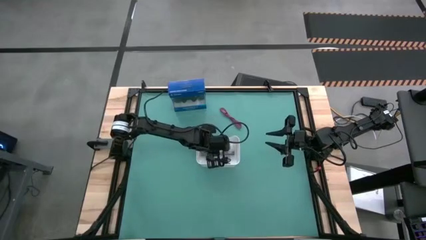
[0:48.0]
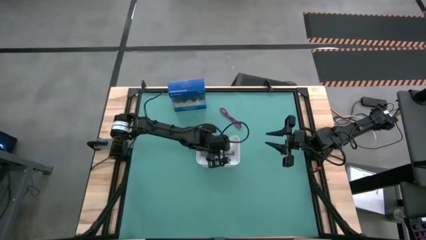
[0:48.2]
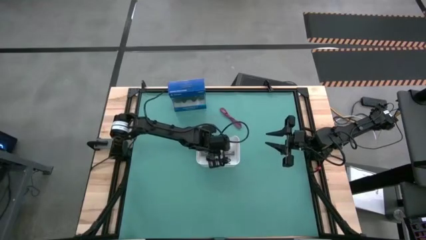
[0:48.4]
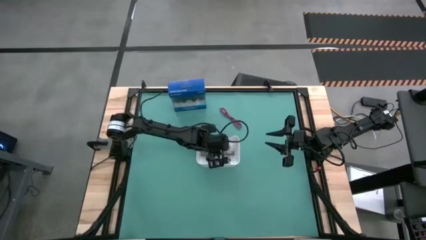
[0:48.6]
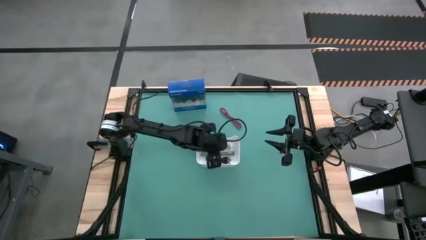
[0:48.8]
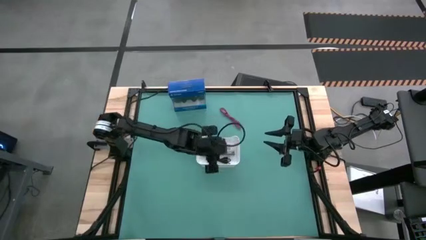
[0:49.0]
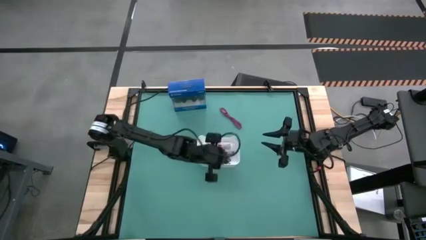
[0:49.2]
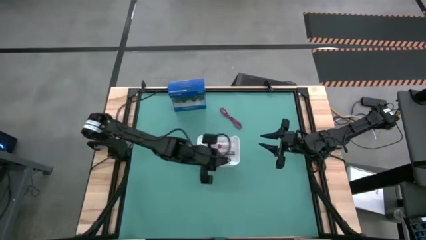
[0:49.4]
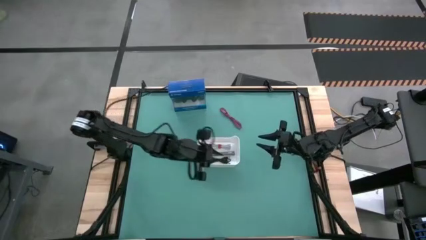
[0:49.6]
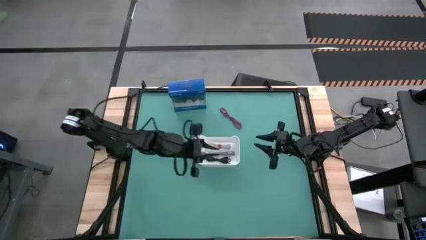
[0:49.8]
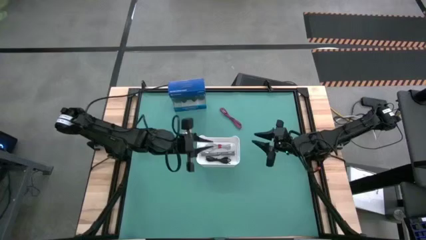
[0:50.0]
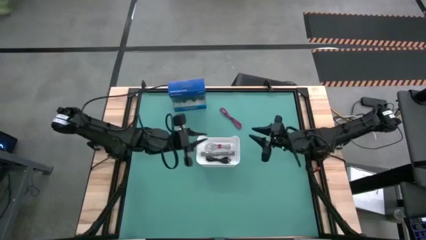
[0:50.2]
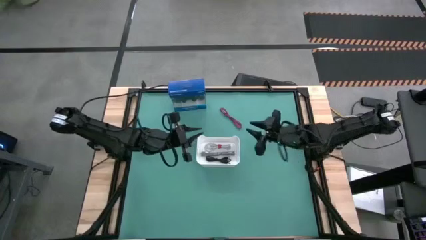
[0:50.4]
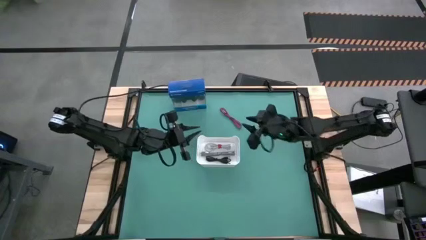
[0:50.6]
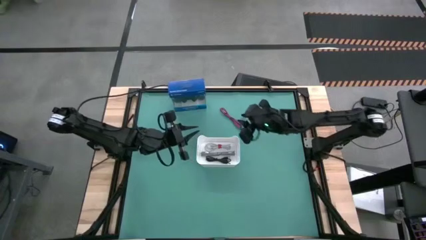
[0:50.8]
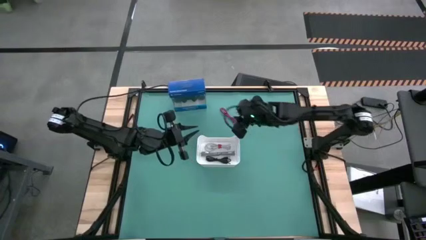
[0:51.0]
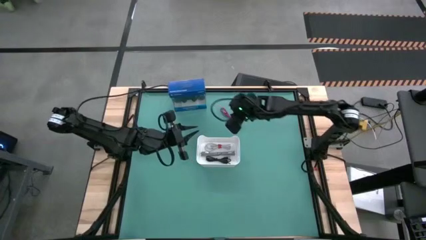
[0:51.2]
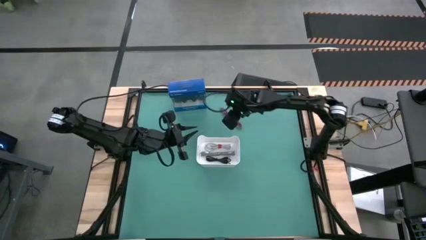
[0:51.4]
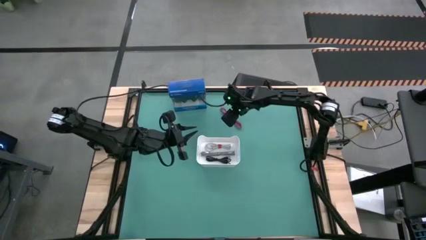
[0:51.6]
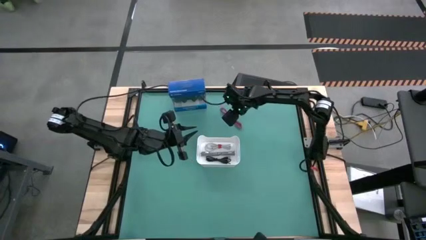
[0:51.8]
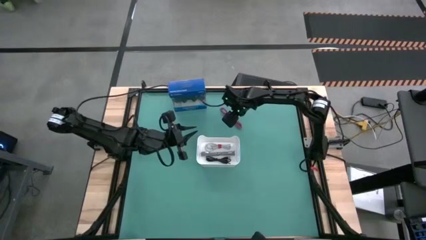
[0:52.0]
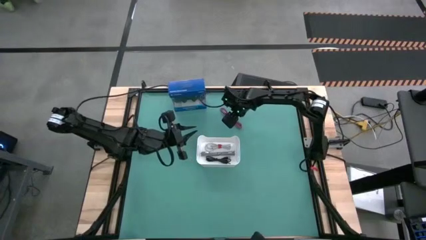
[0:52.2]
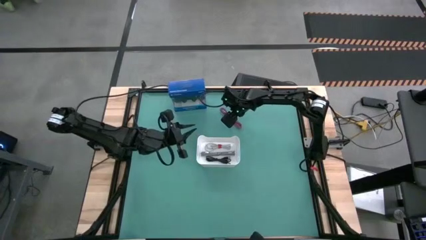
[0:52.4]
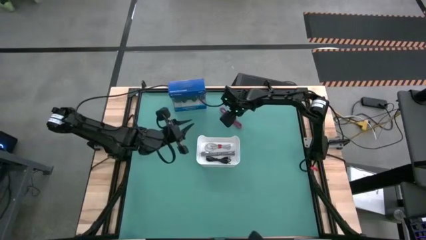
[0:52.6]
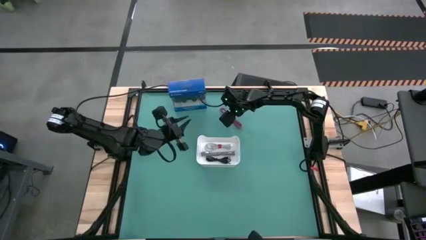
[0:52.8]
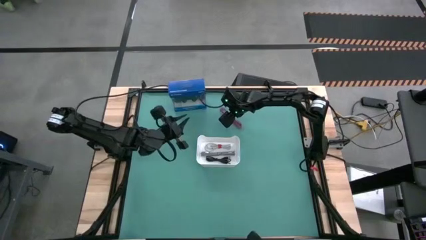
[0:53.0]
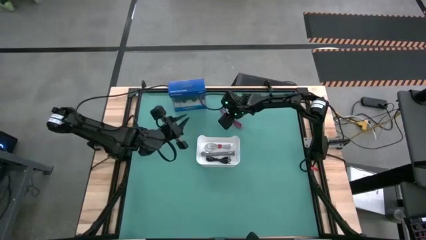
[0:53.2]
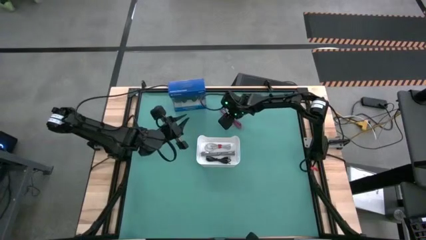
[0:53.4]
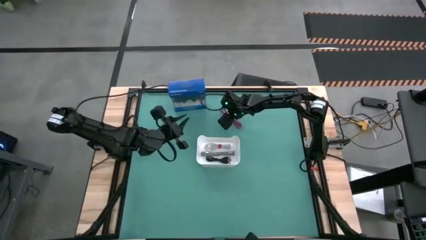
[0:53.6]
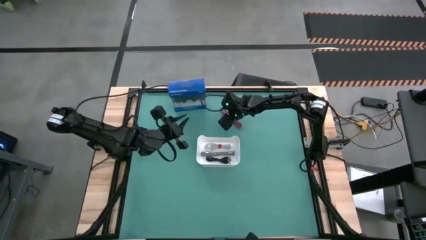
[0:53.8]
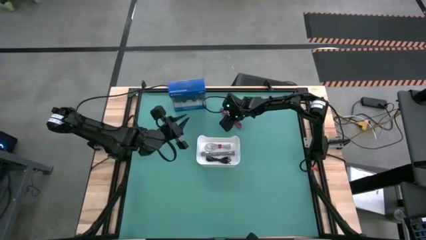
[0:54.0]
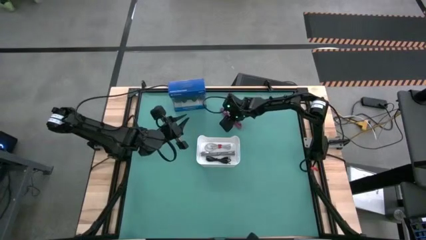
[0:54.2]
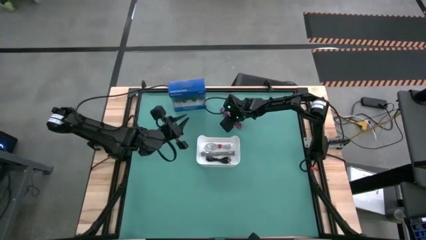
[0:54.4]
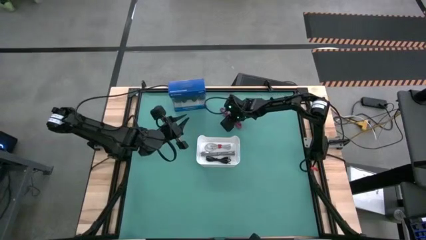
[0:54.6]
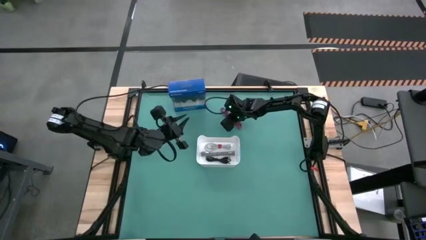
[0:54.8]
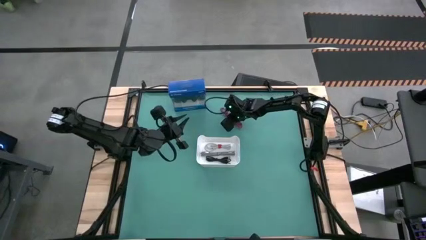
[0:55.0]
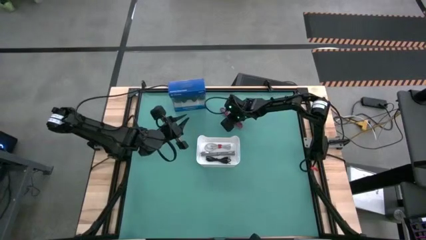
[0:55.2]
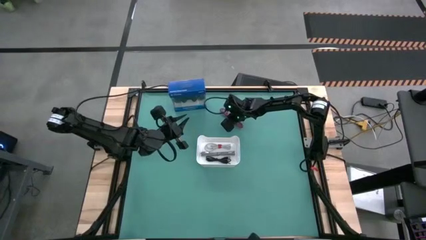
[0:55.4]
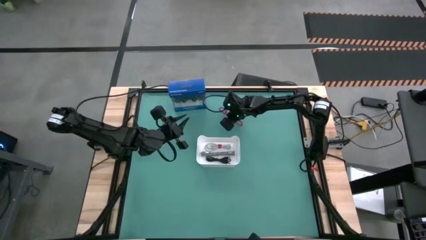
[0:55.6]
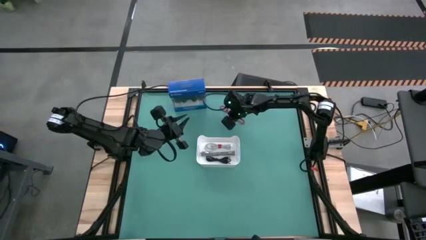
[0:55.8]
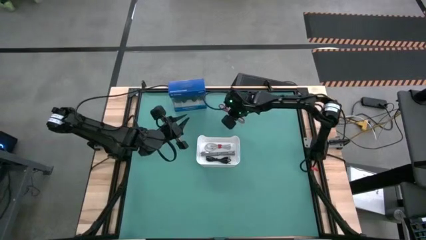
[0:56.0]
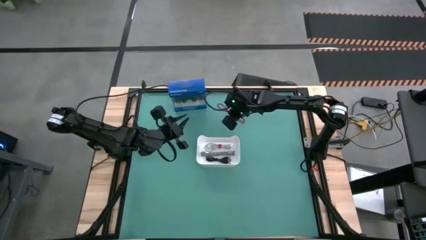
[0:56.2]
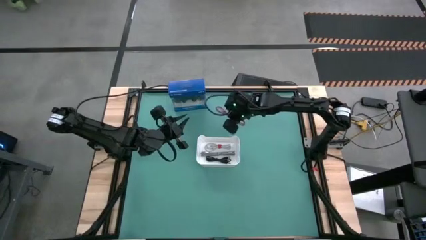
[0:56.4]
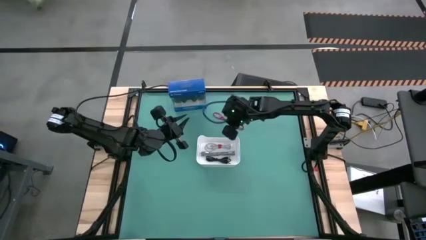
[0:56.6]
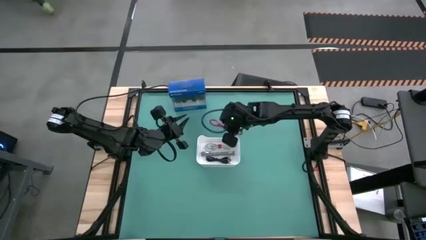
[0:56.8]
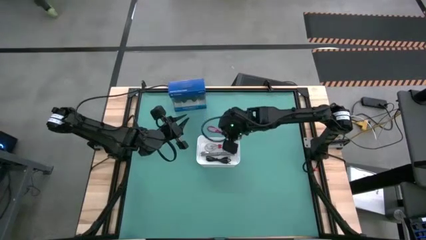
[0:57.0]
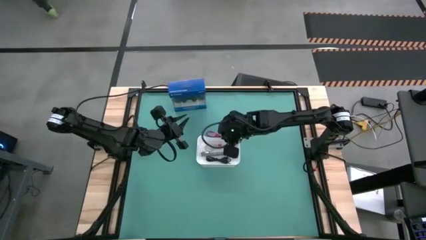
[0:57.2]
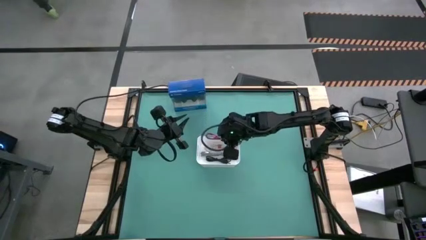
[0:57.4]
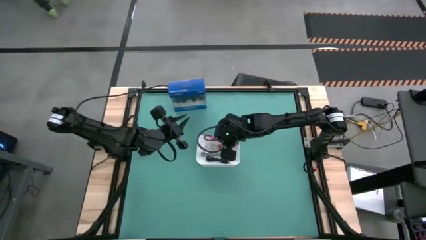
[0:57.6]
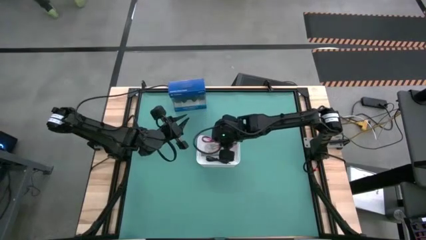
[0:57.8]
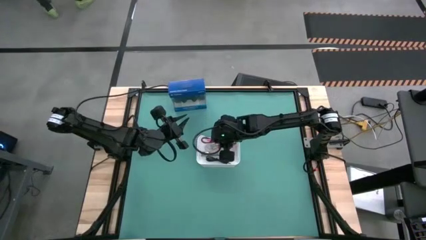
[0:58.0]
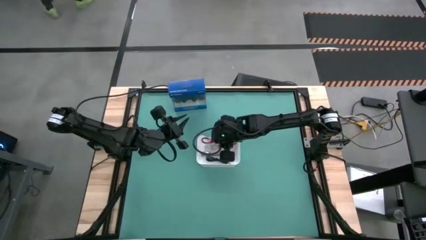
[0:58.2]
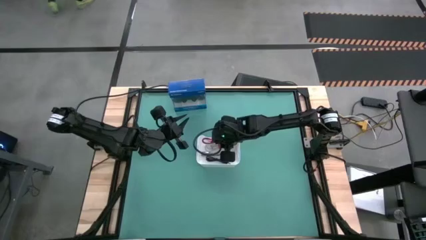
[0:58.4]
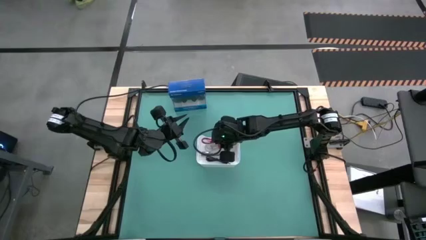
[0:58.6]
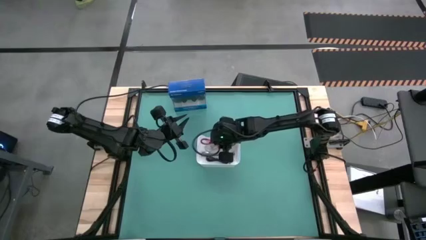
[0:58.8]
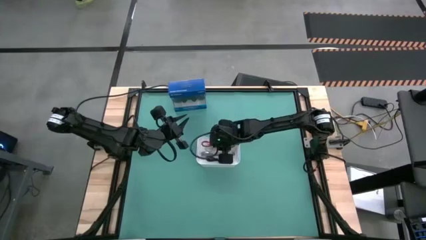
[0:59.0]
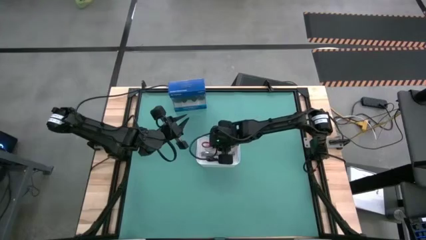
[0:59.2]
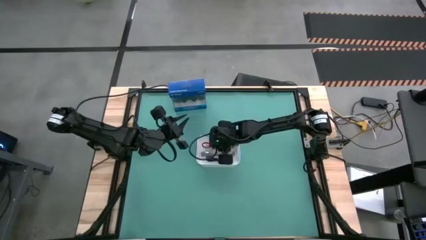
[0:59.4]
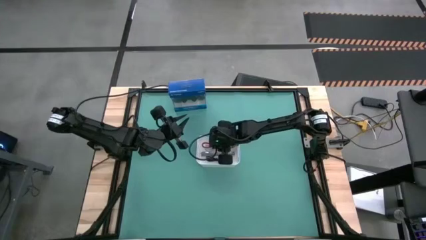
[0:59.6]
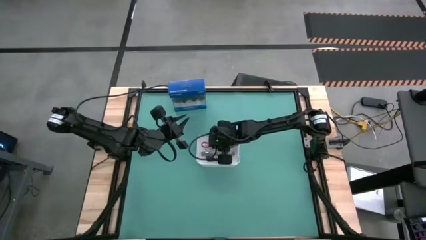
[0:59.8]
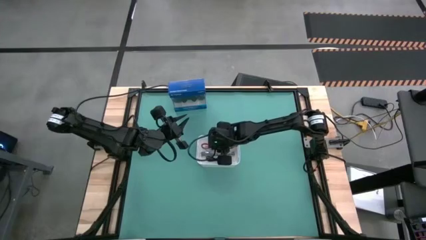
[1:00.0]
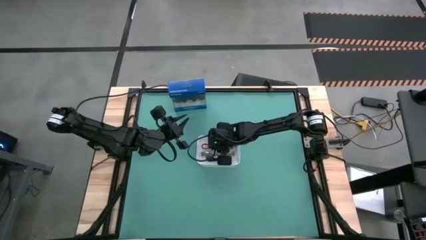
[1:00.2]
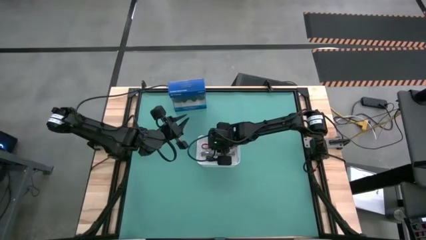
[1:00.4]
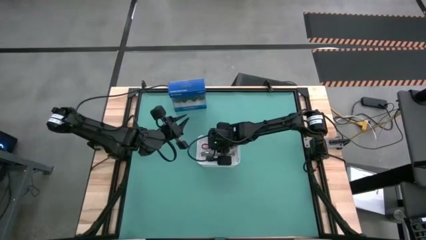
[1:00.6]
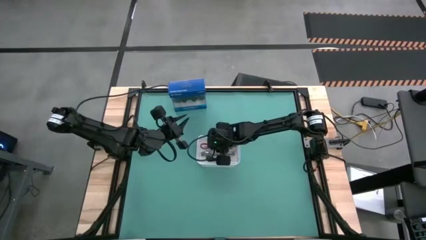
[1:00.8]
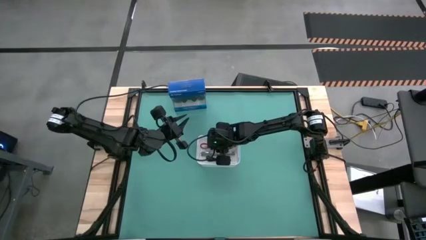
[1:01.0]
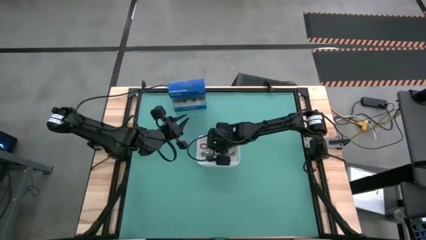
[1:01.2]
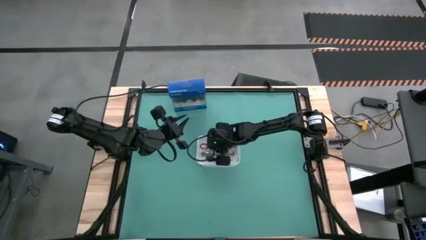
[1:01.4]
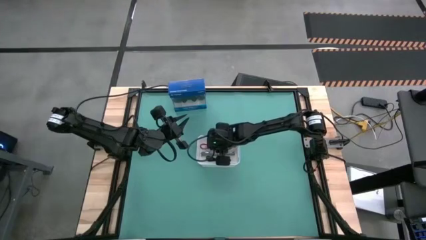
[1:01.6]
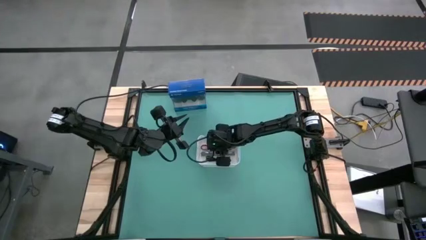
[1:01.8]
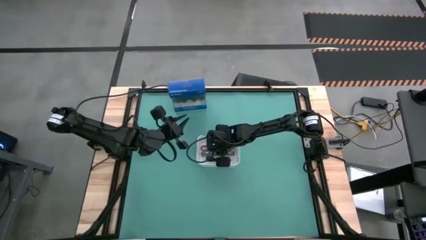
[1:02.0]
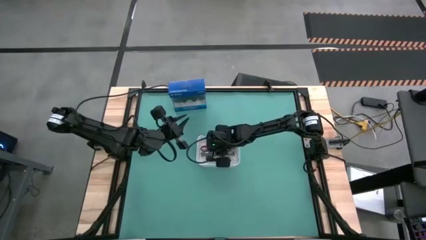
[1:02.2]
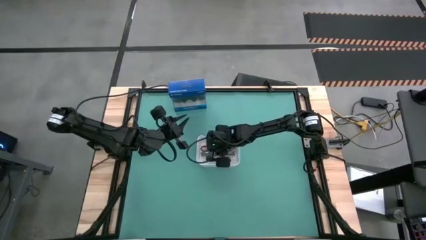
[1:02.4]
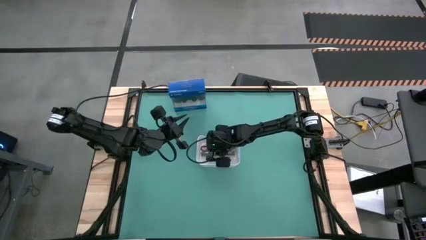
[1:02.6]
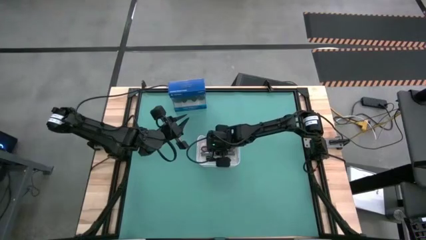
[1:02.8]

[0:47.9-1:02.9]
Task: Pick and place USB-C Cables
Put the pink black charger cable into the white bin

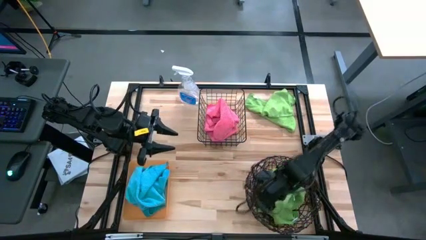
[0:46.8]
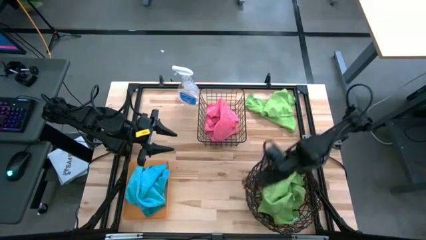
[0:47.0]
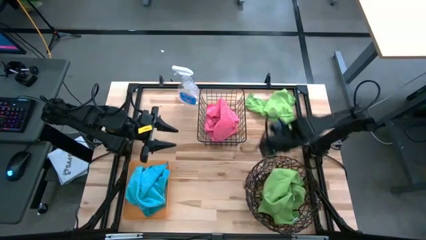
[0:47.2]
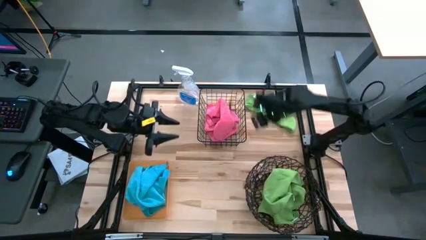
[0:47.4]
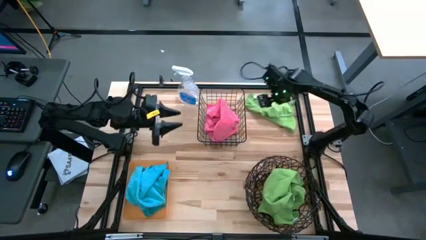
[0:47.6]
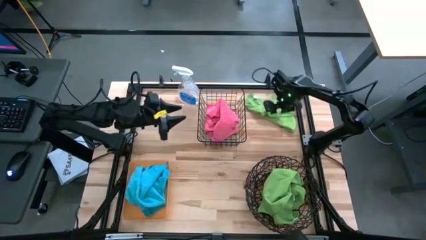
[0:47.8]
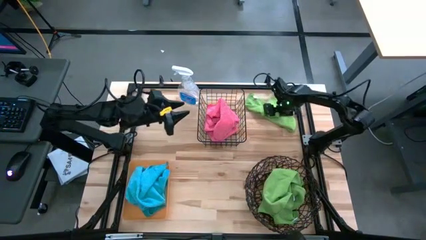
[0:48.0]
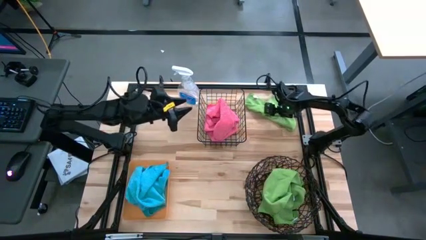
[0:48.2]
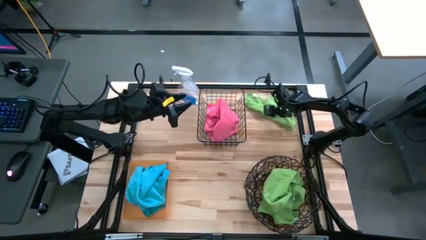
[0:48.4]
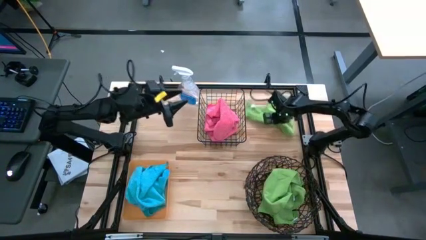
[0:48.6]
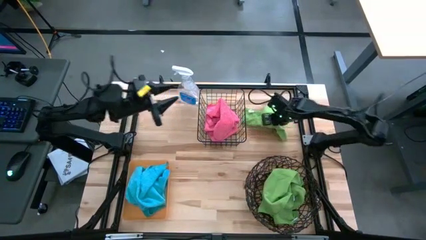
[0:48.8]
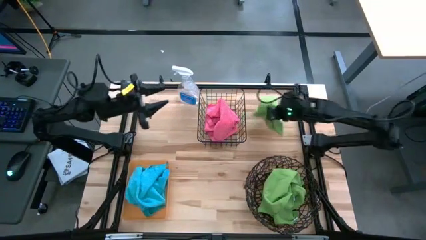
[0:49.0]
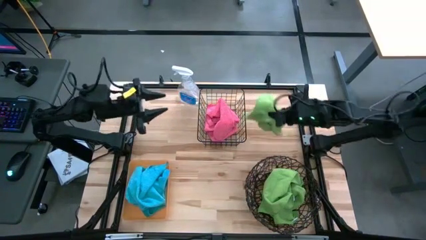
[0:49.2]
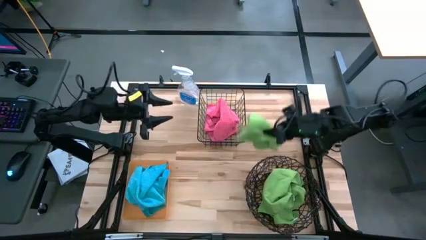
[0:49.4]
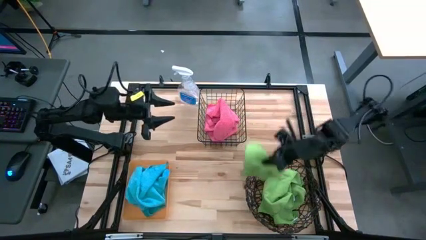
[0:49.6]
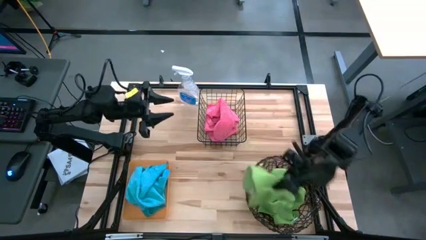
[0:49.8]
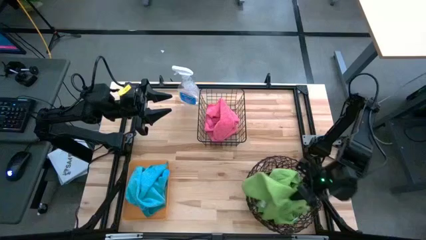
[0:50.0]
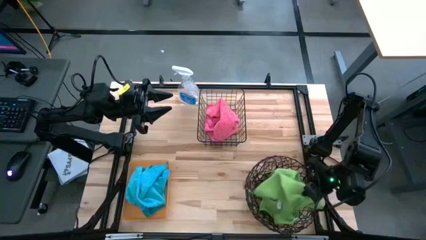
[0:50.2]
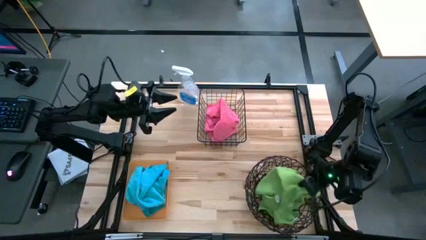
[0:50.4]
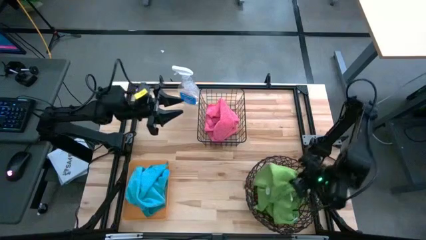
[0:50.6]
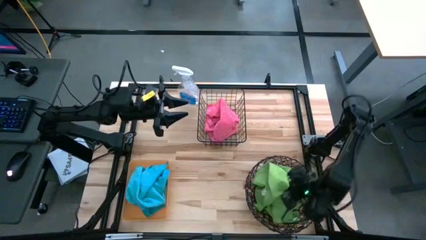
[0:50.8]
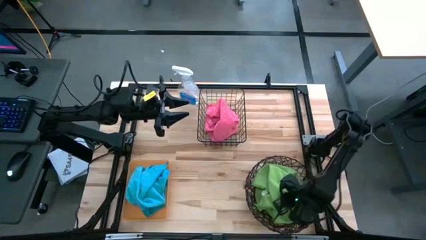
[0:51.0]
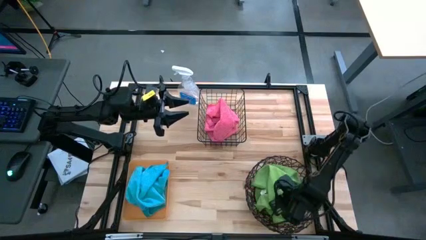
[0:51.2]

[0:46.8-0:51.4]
Task: Sort microfiber towel by color & place in baskets
Put the green towel into the black woven basket
